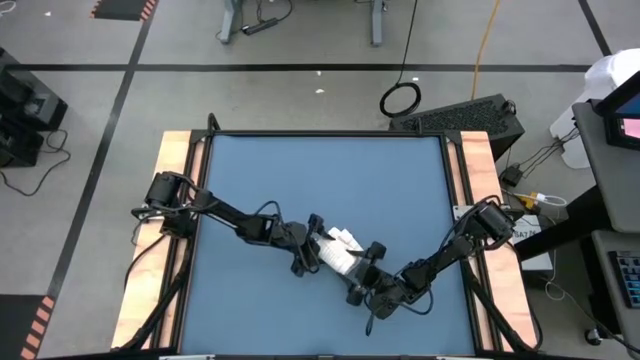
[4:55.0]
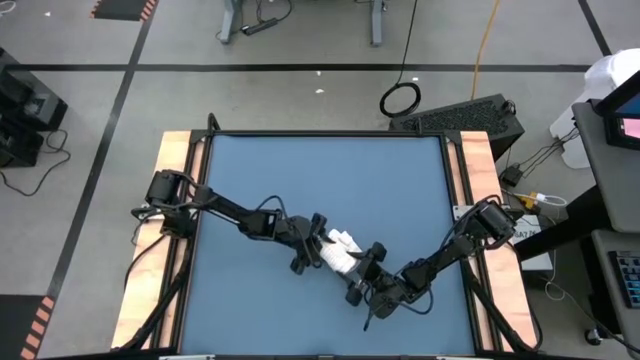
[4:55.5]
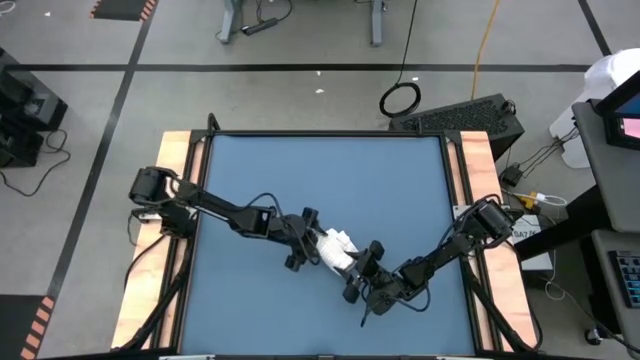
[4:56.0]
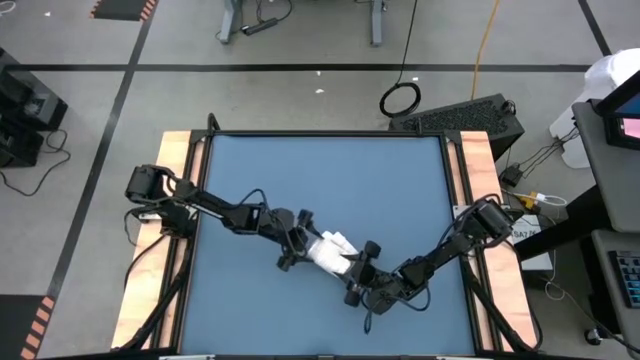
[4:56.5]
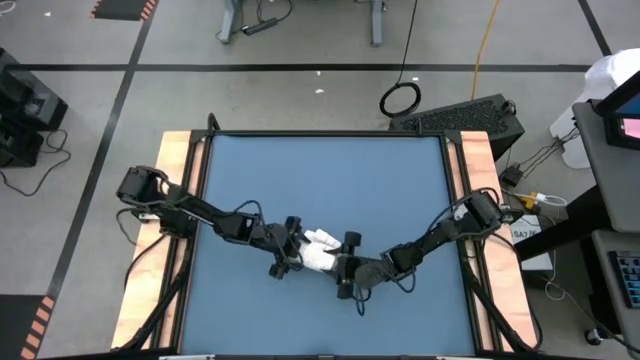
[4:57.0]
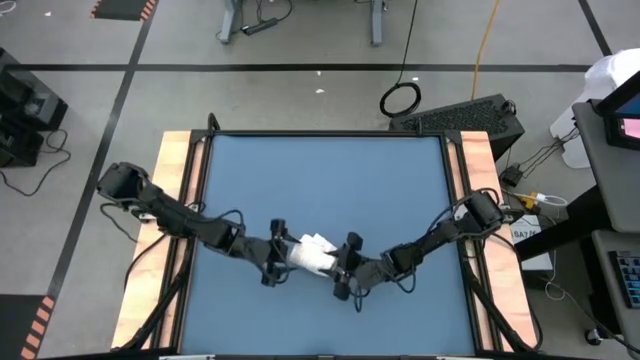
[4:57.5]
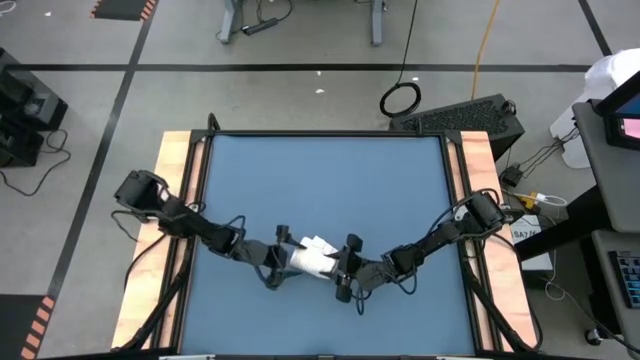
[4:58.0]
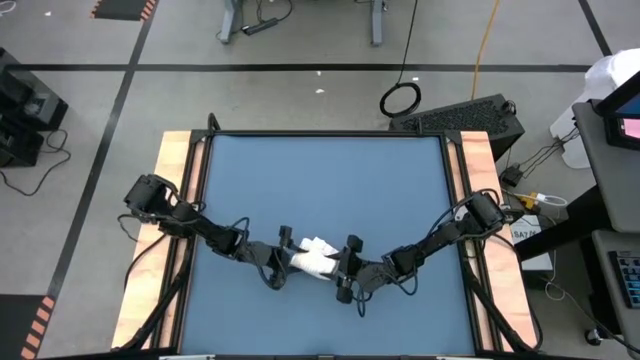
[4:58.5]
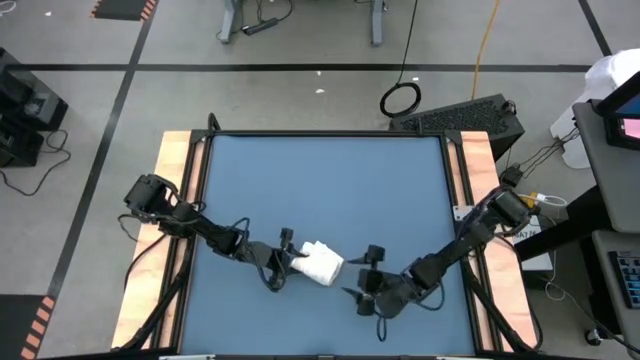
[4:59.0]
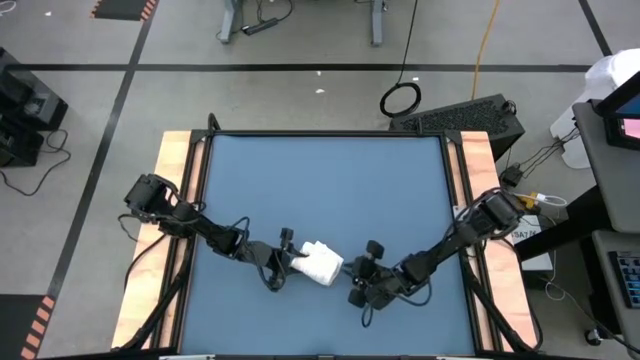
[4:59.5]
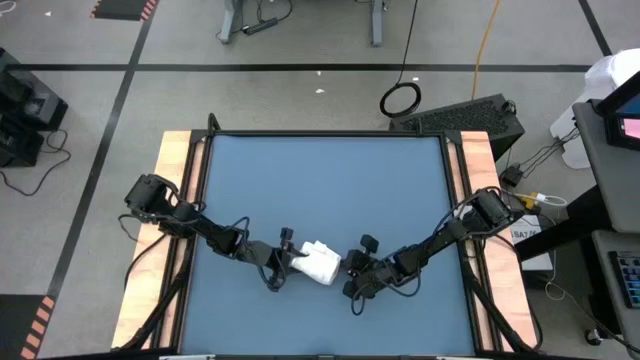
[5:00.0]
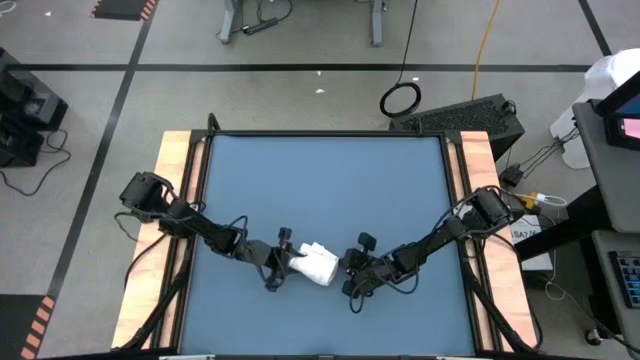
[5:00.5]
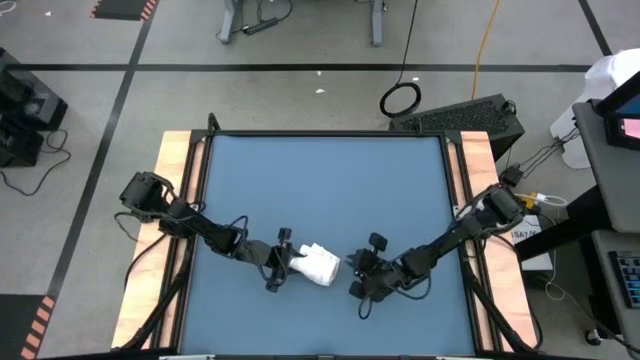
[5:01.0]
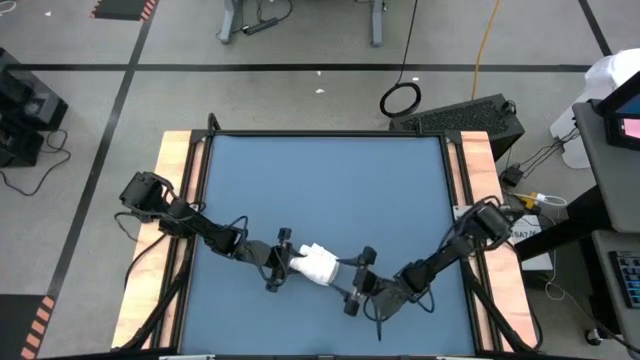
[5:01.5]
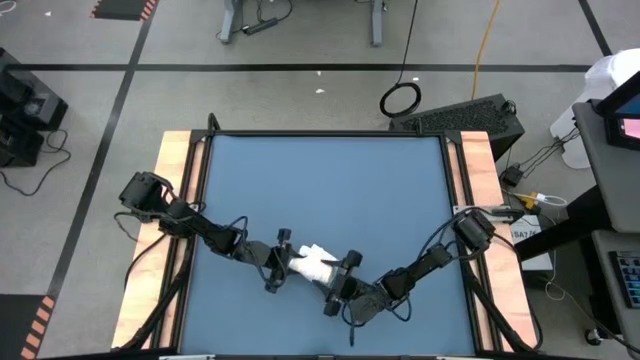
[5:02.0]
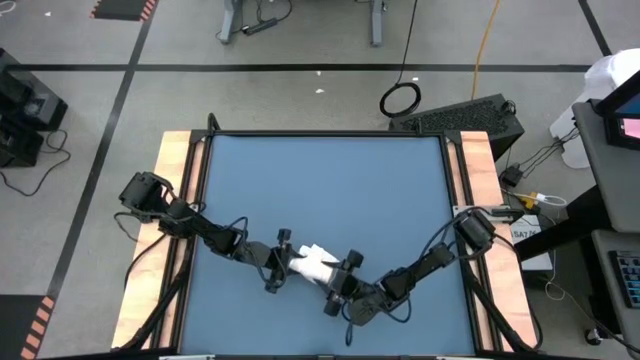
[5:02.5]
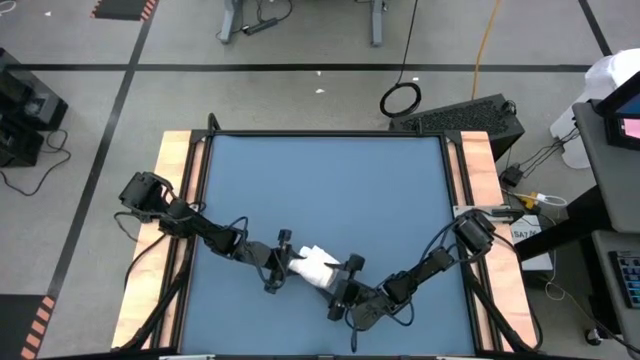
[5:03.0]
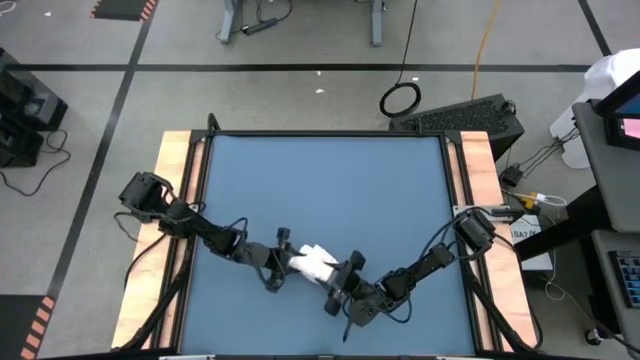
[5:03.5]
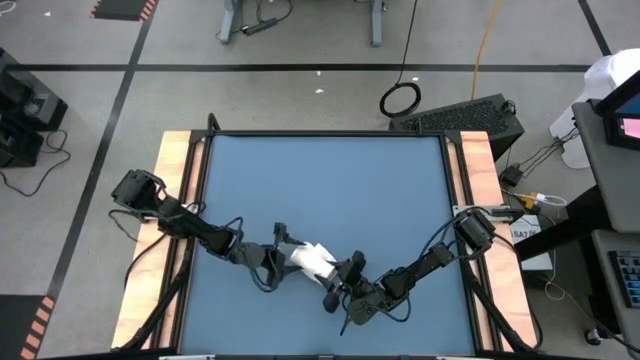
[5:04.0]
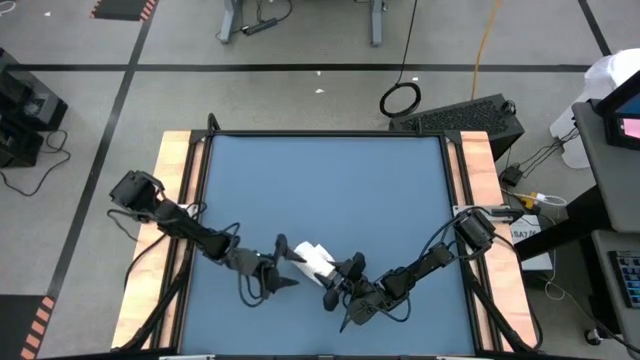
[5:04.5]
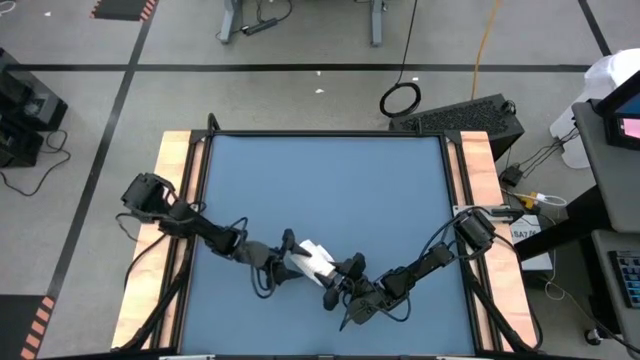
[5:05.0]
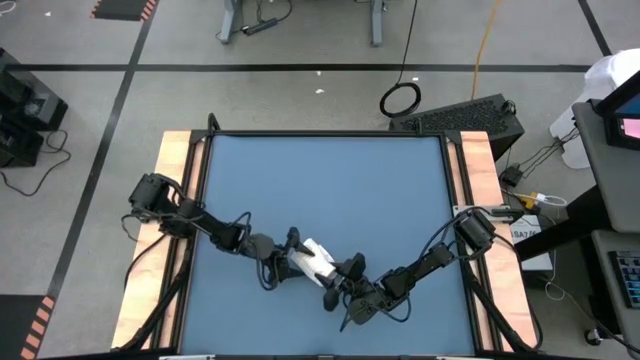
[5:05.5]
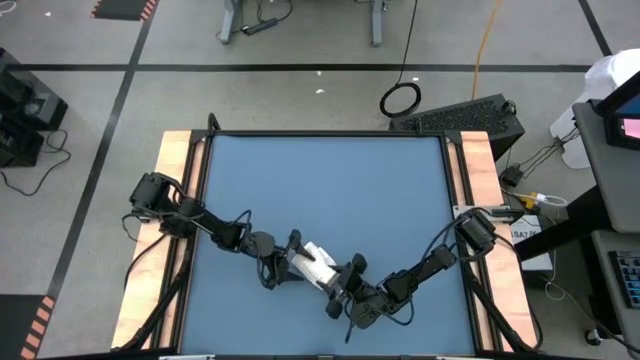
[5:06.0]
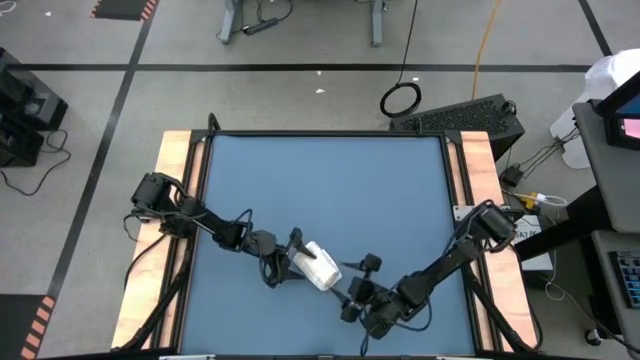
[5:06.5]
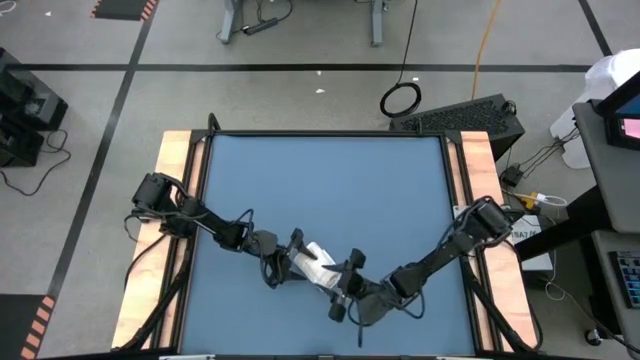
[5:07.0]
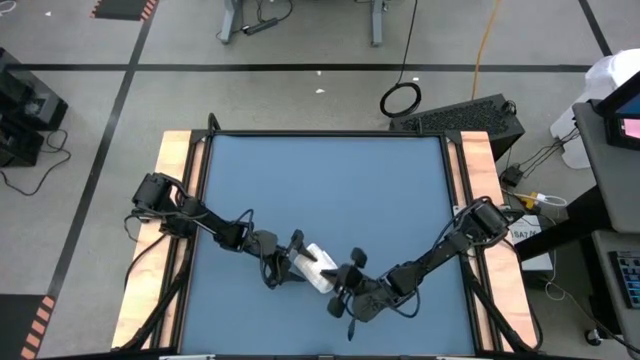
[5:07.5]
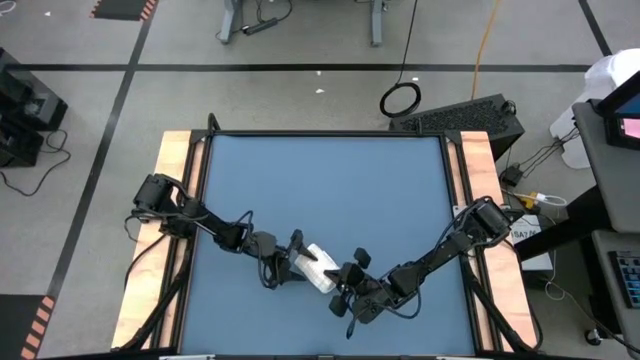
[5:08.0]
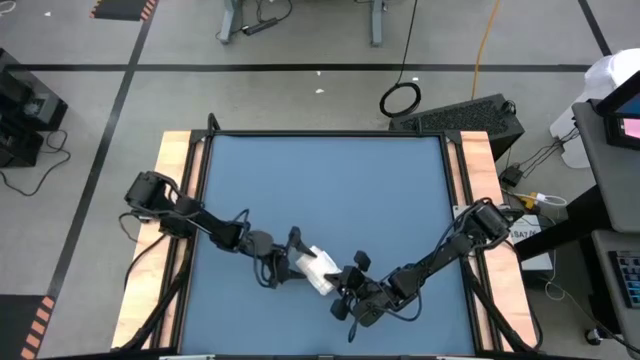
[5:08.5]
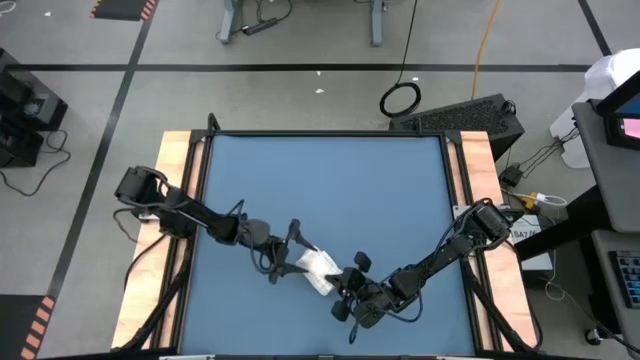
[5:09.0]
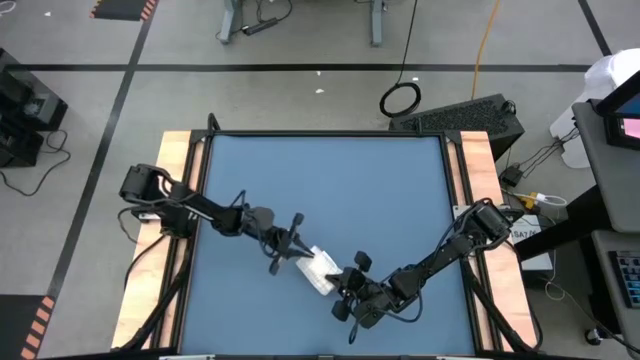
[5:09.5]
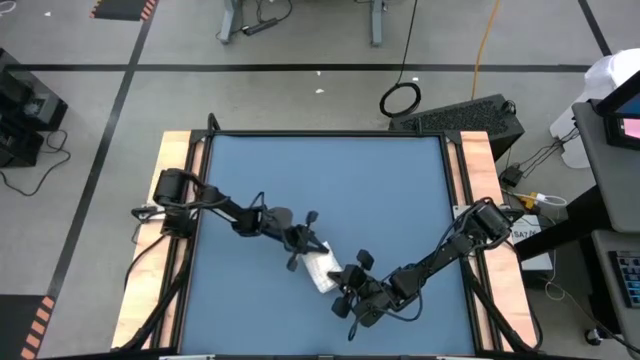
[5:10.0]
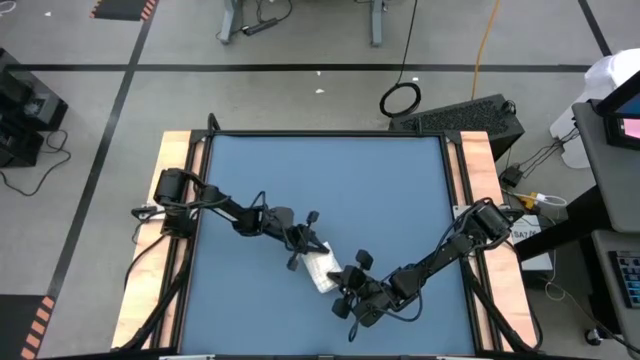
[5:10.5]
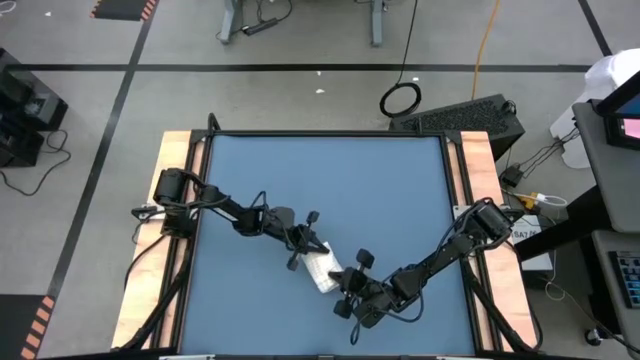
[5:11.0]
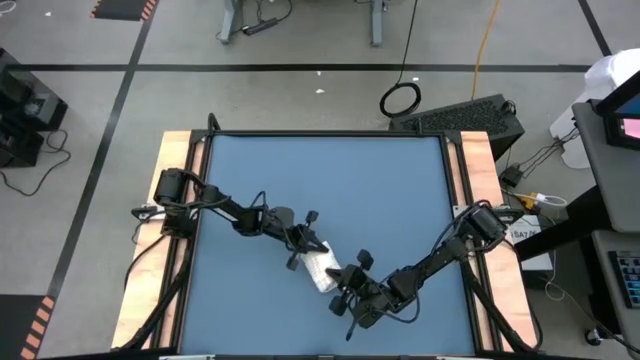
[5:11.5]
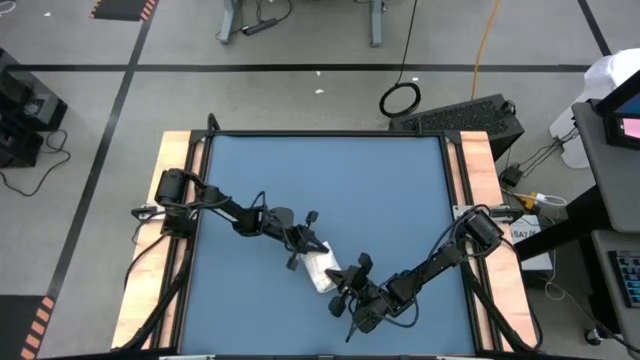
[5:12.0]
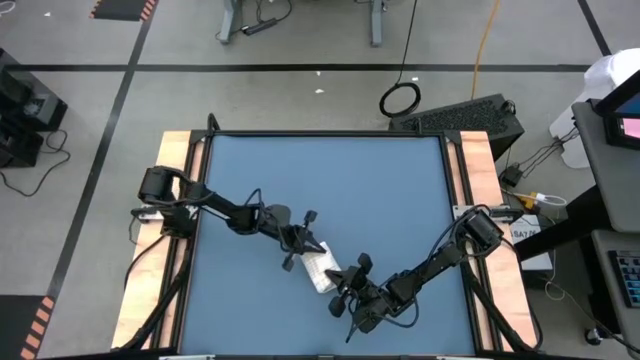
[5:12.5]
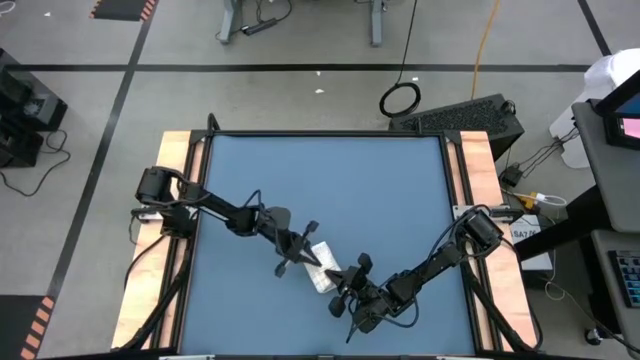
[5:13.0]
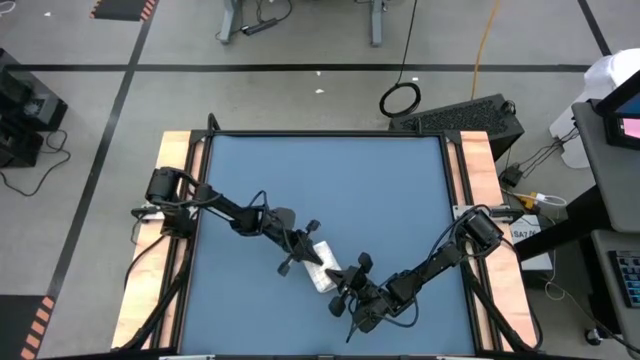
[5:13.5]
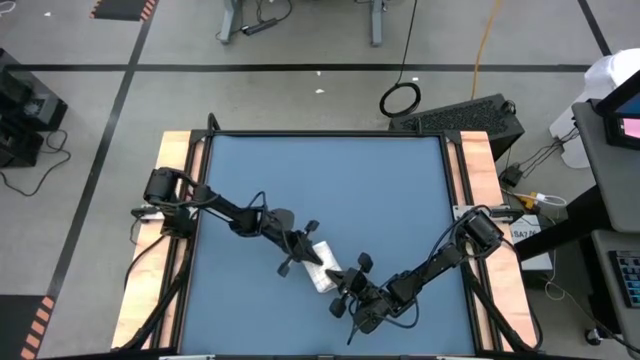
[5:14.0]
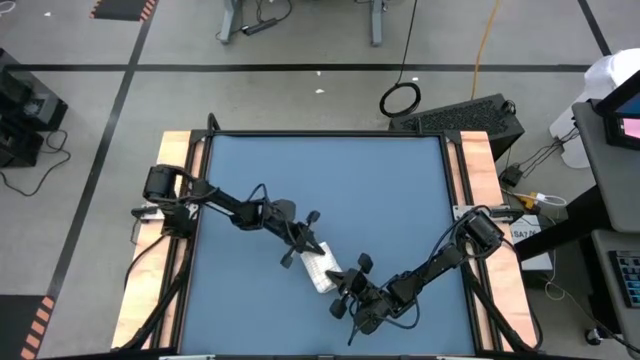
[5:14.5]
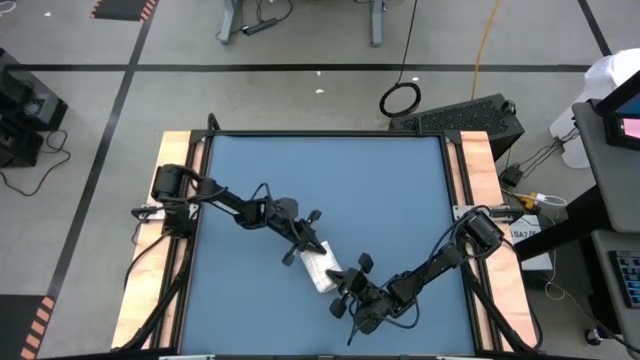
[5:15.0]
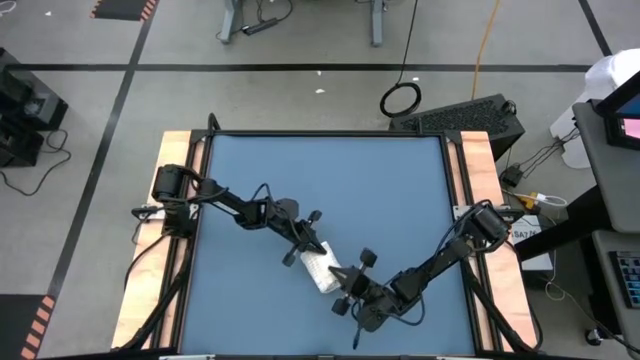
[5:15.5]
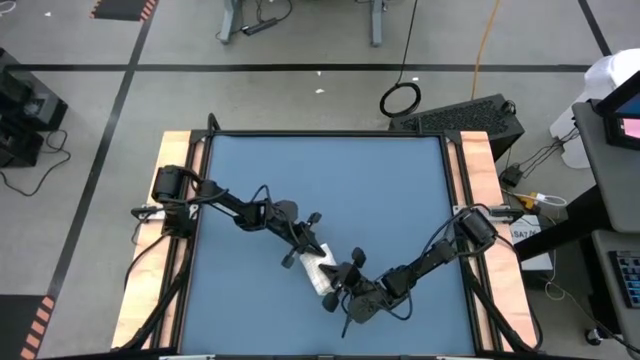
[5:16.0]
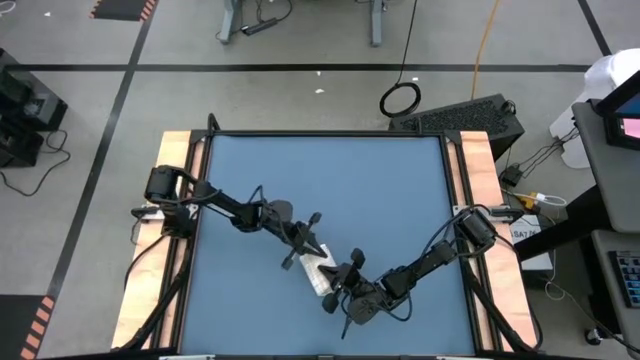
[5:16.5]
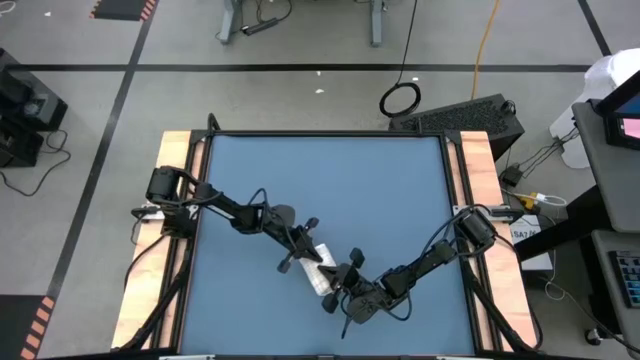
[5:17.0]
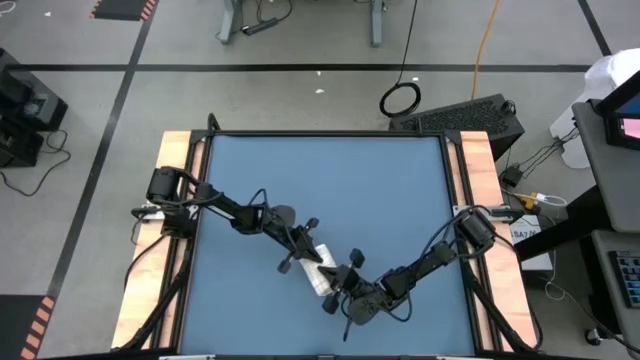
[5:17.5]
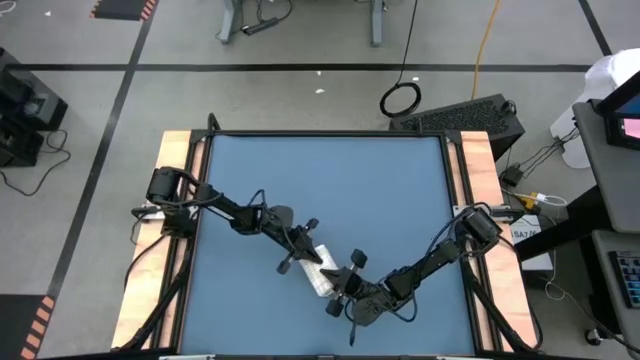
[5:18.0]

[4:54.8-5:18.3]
Task: Roll towel into tight, uniform cylinder
Roll the white towel
